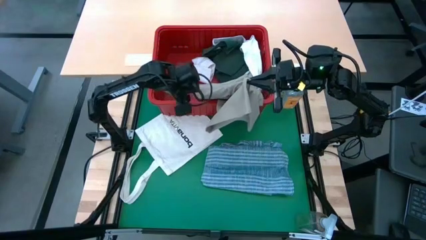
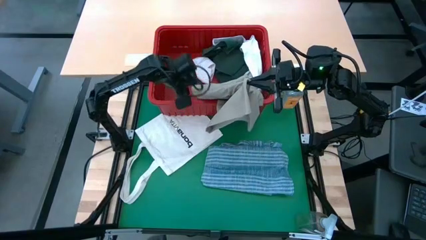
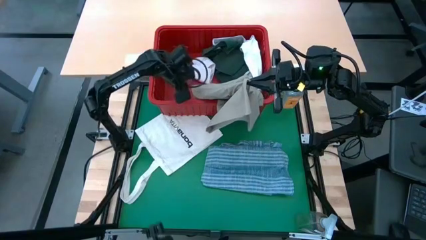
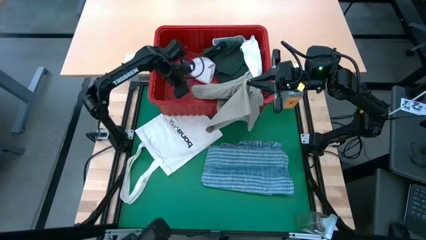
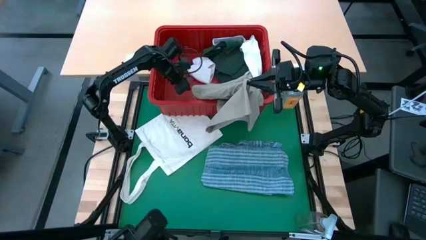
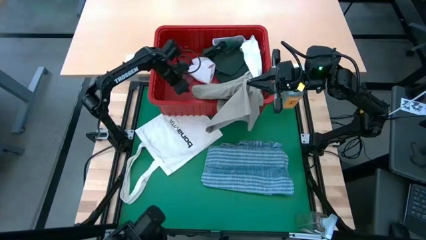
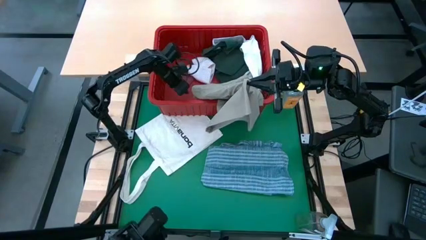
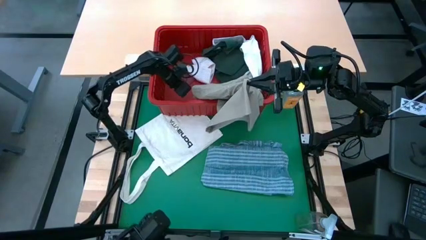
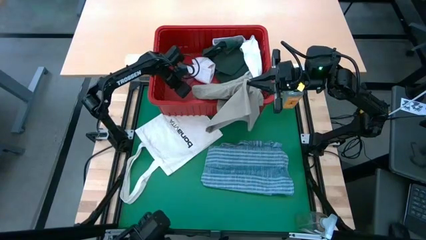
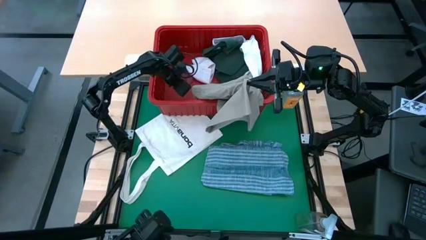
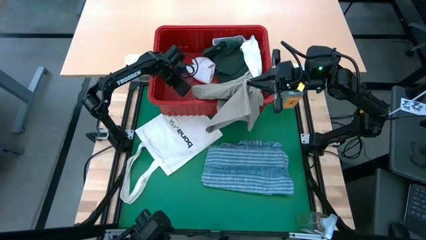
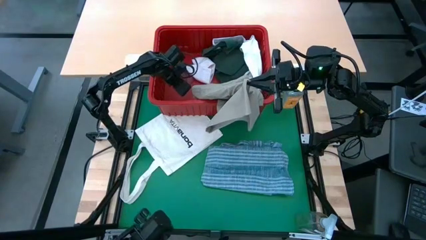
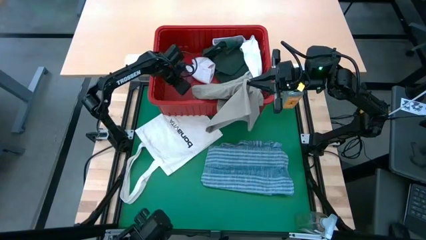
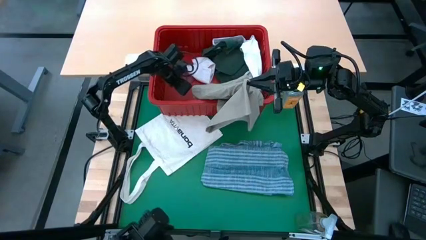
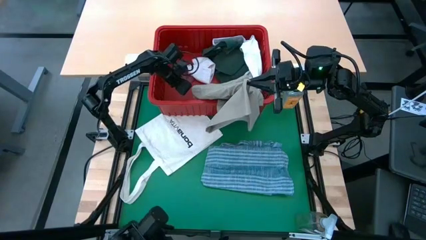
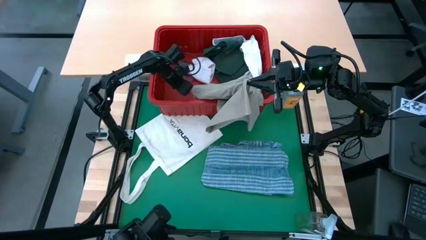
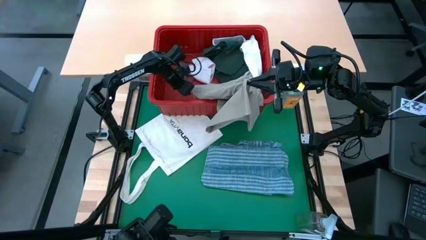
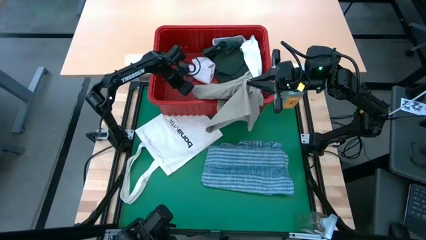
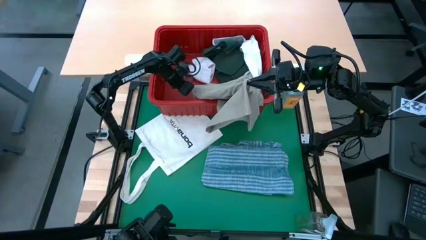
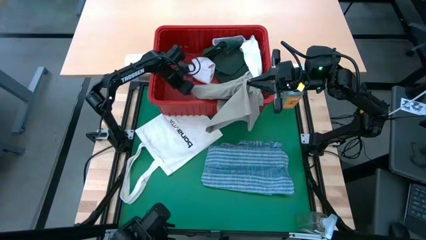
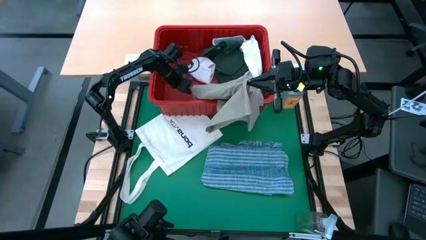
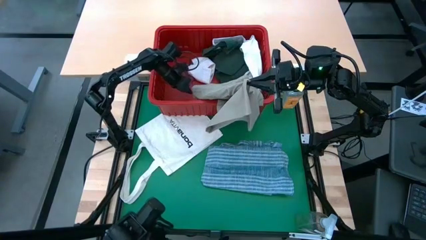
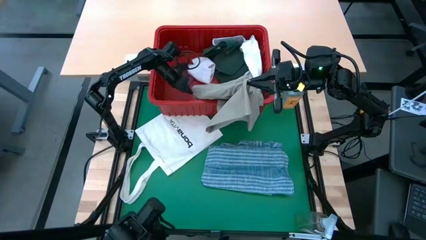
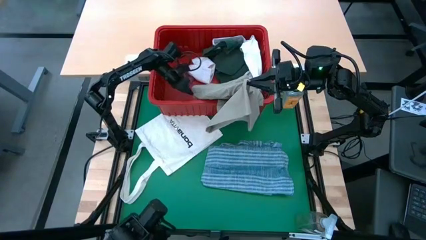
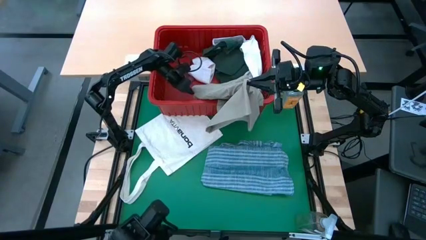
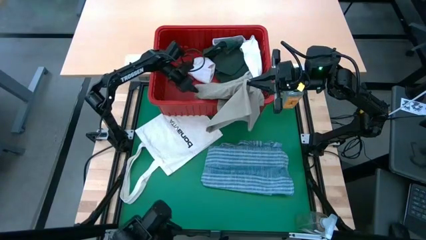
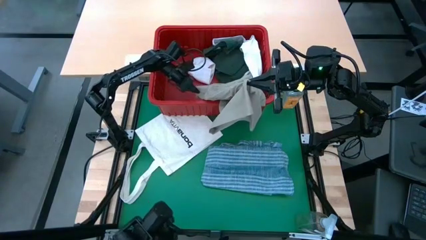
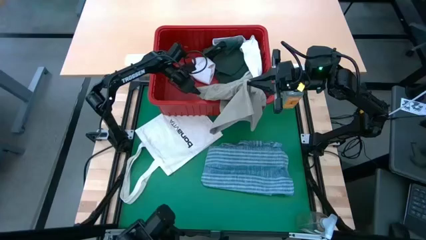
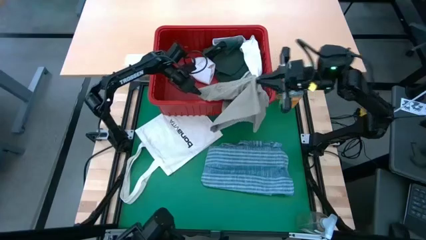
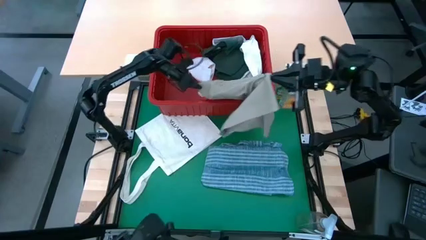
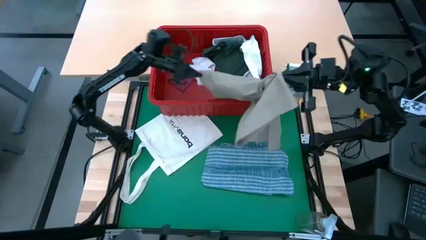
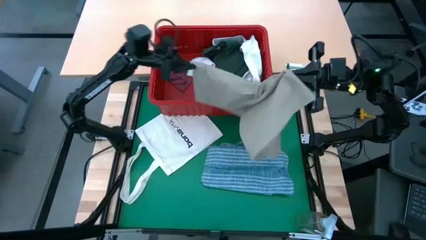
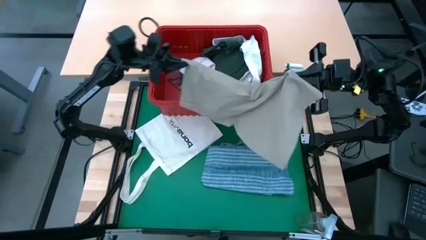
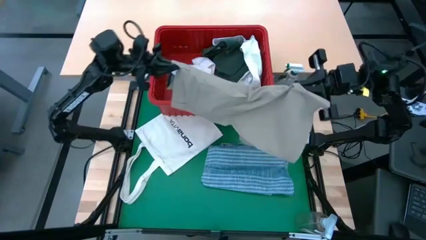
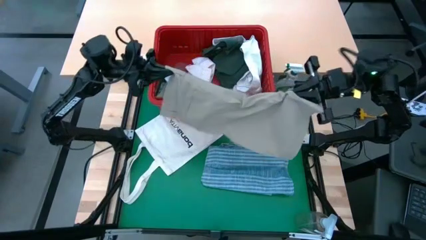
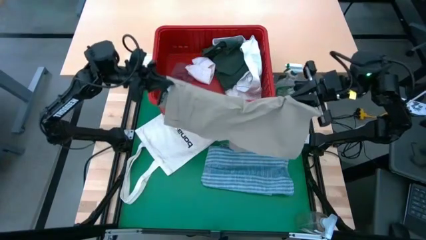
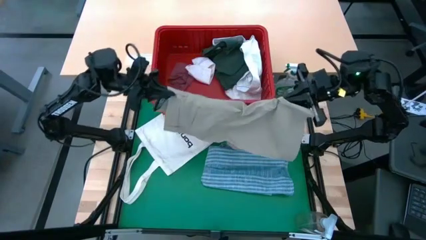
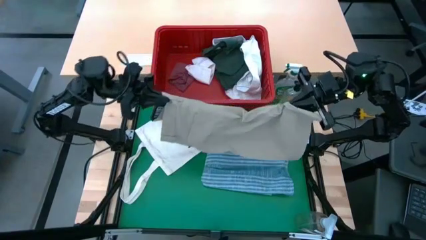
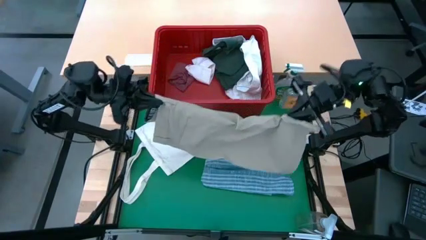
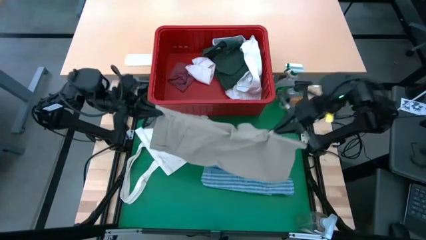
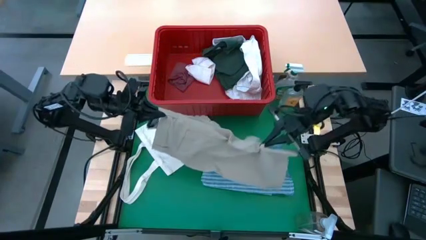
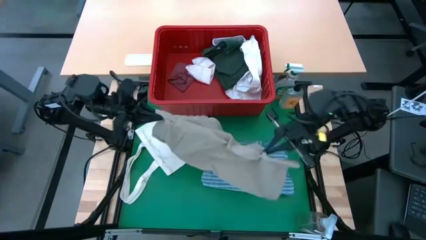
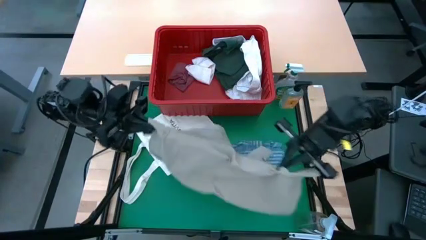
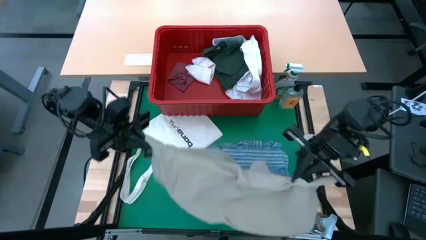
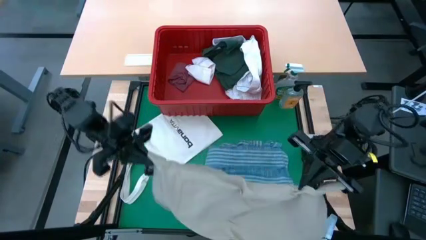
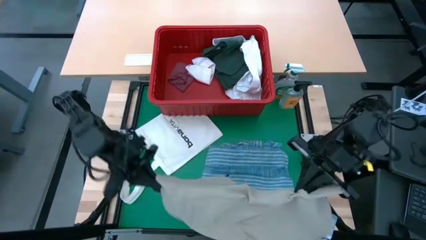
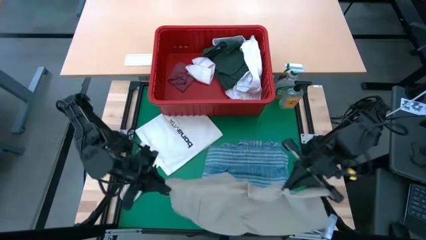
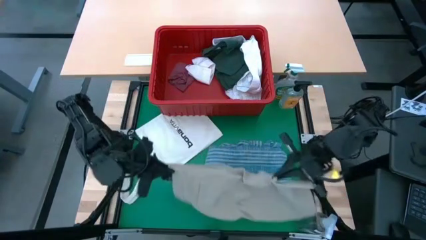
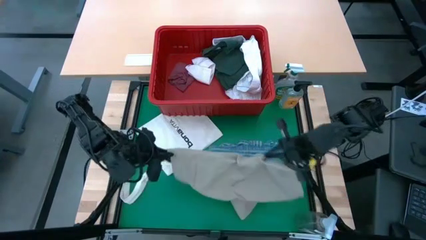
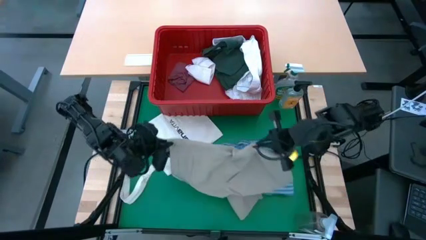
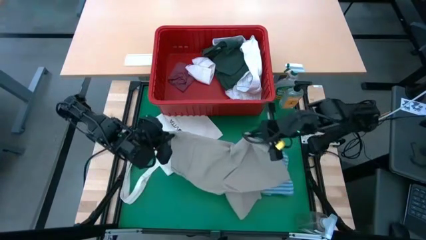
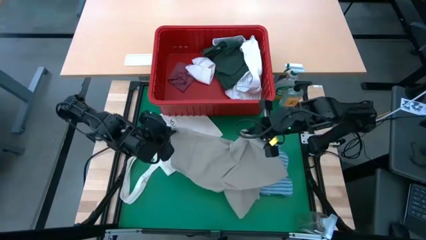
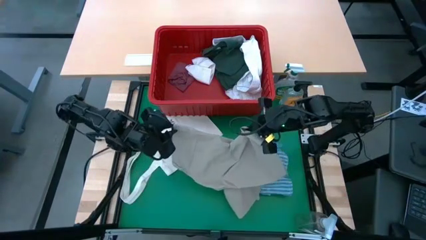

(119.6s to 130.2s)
Task: Fold Laundry from Bin
Remove the brown shorts from the red bin
